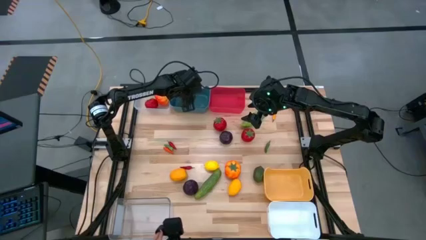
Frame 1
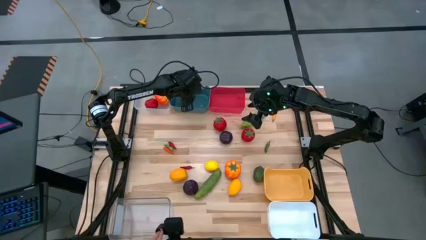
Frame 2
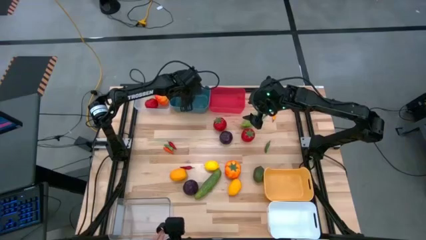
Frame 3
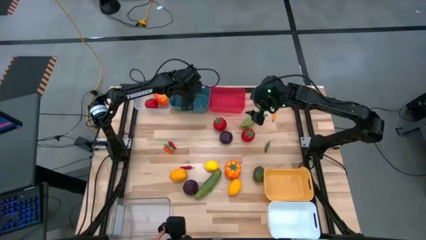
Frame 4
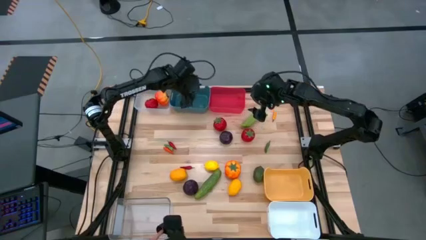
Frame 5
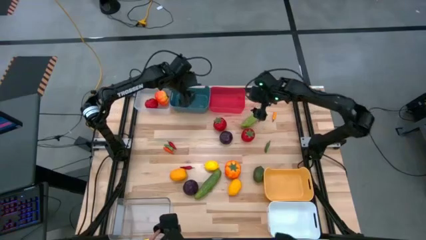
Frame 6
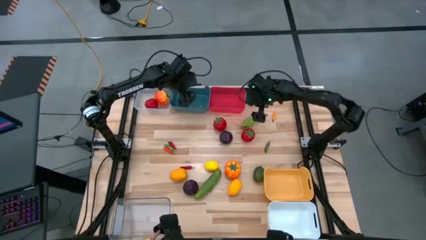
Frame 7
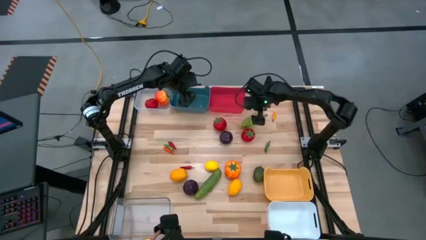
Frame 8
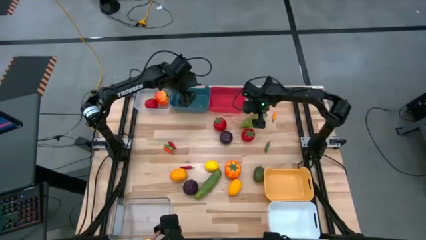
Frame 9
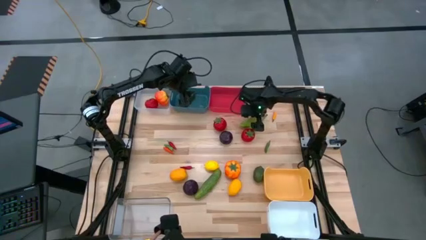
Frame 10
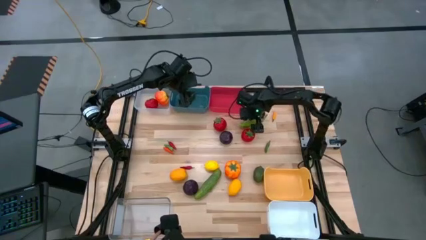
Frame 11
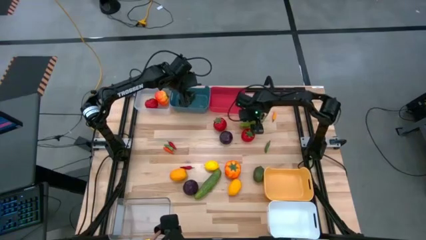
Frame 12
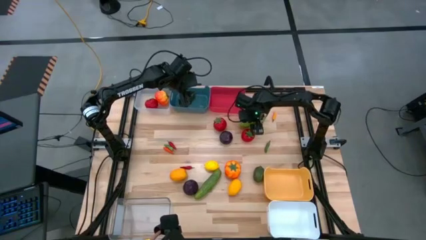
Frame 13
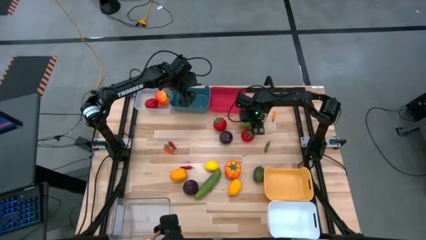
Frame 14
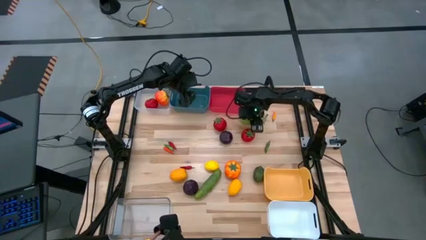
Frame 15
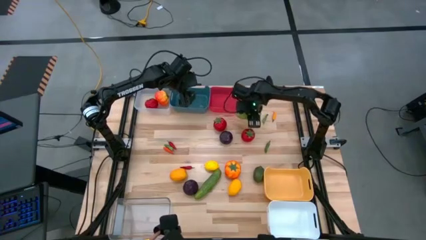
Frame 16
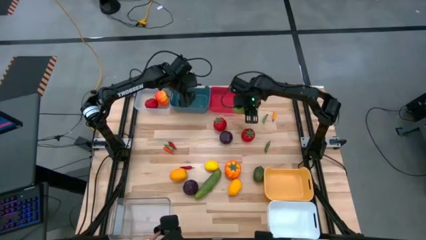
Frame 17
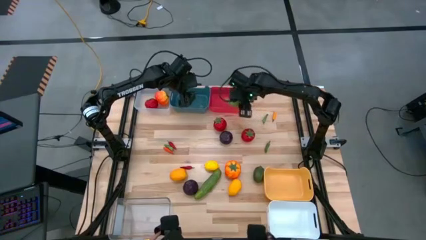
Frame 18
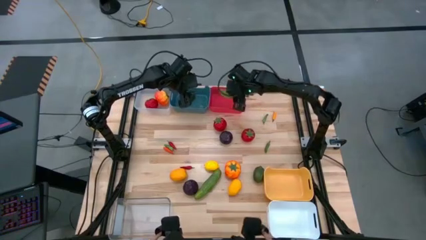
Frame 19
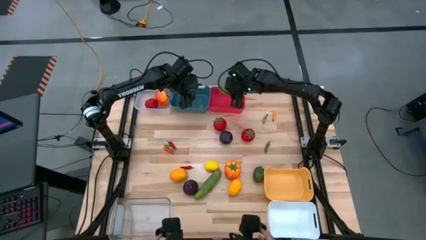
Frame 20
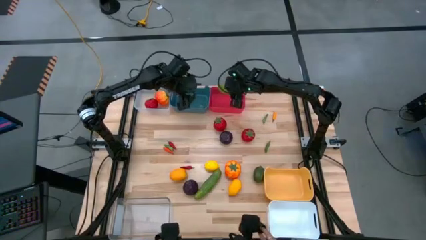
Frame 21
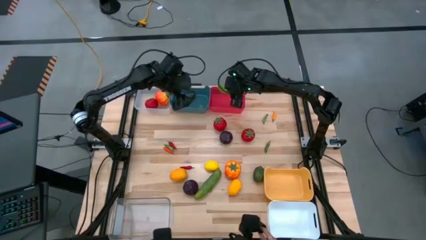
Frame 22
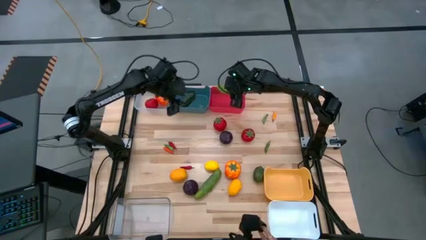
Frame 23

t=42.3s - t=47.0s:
Task: Sort produce into baskets
Put the cucumber into the red bin

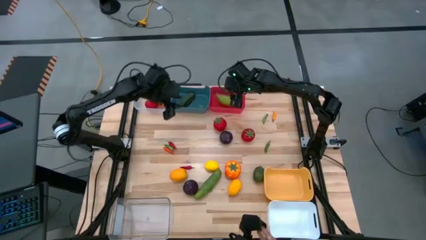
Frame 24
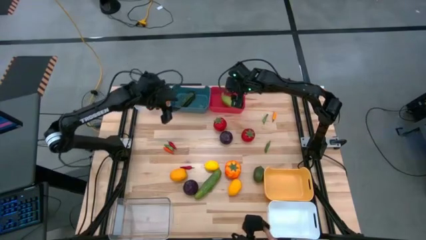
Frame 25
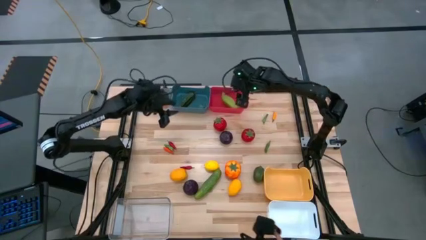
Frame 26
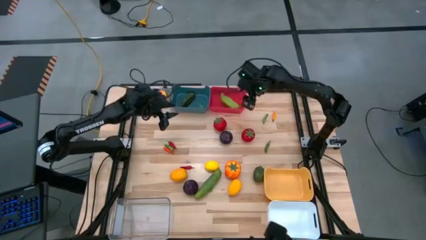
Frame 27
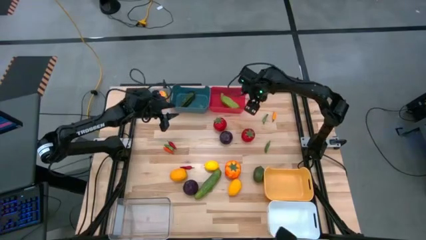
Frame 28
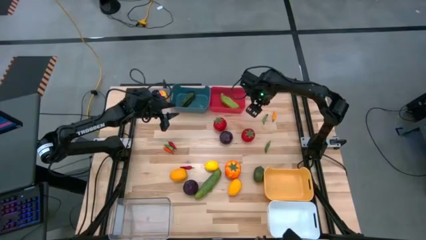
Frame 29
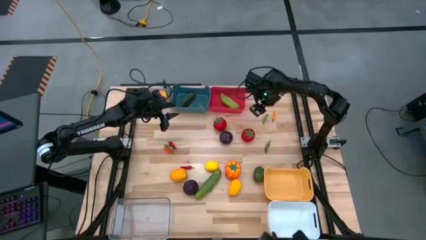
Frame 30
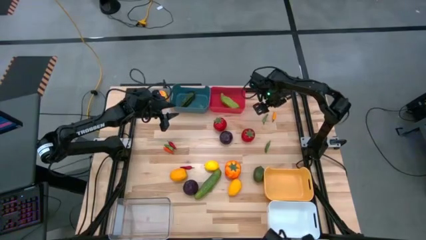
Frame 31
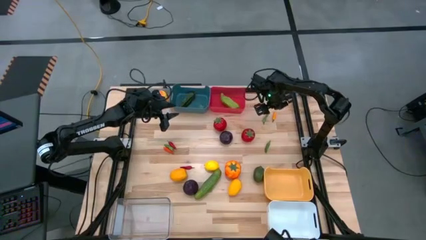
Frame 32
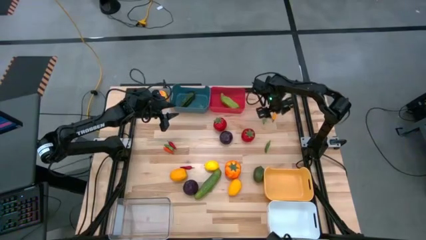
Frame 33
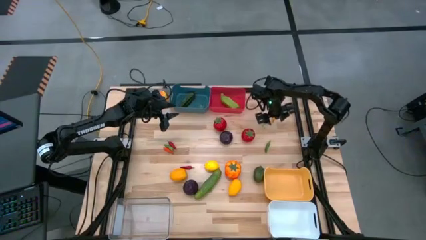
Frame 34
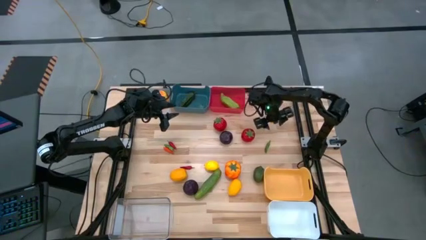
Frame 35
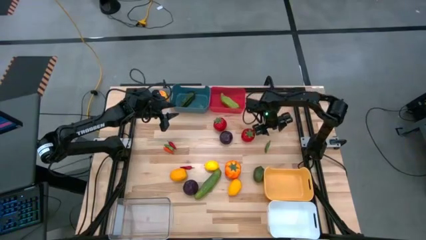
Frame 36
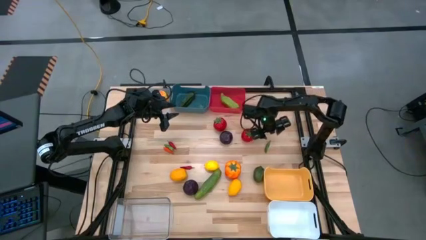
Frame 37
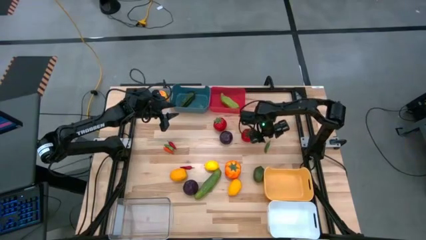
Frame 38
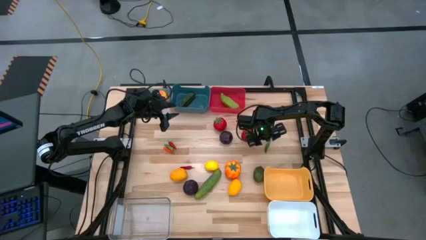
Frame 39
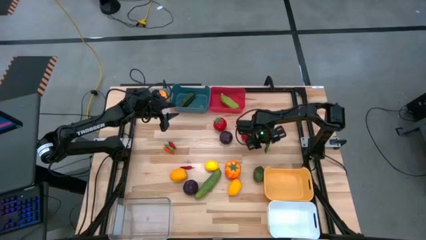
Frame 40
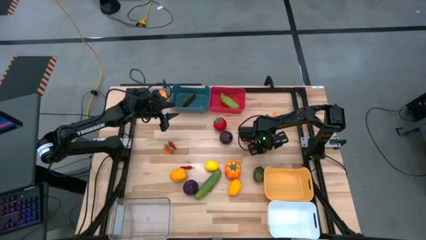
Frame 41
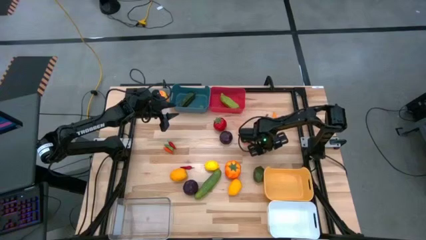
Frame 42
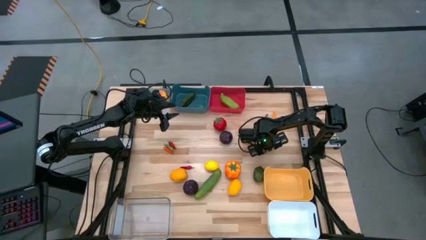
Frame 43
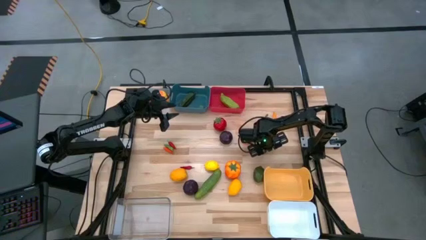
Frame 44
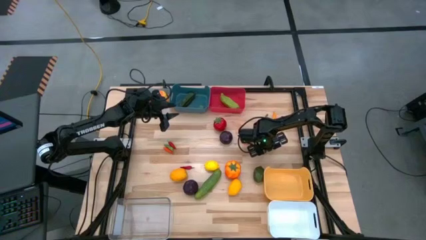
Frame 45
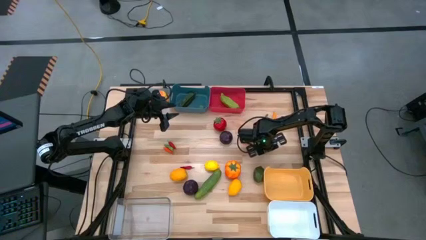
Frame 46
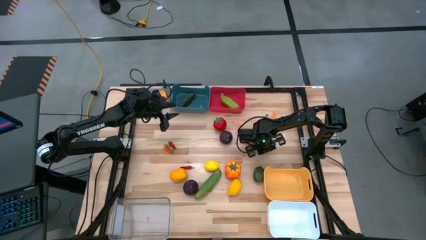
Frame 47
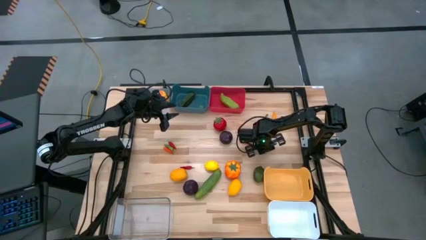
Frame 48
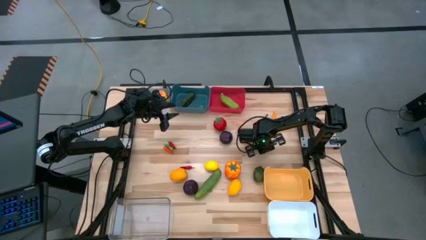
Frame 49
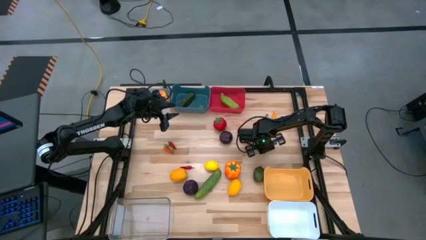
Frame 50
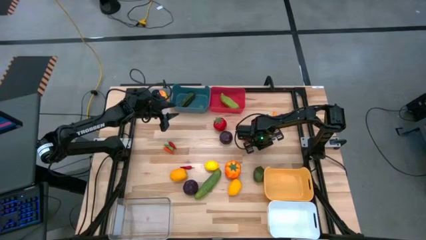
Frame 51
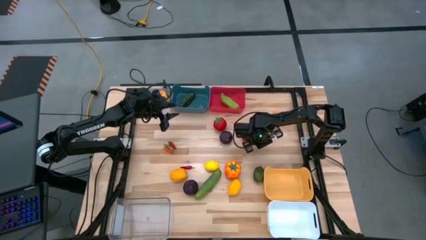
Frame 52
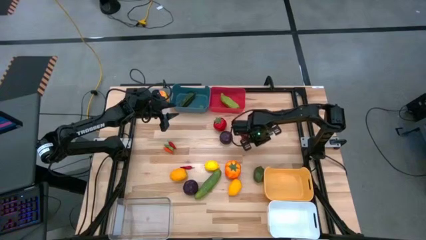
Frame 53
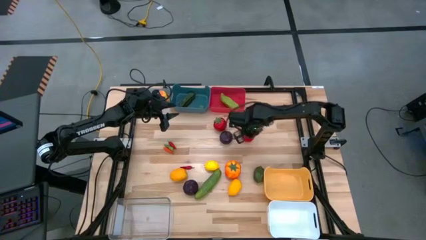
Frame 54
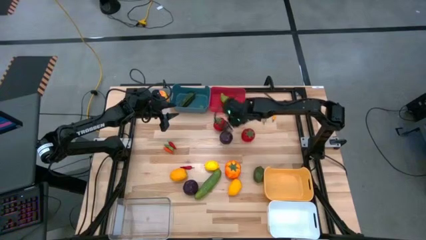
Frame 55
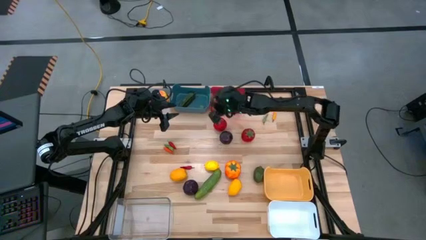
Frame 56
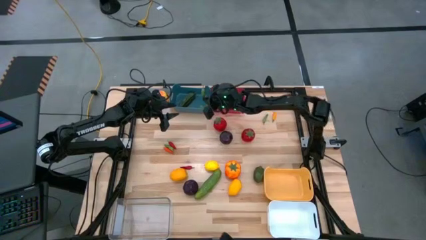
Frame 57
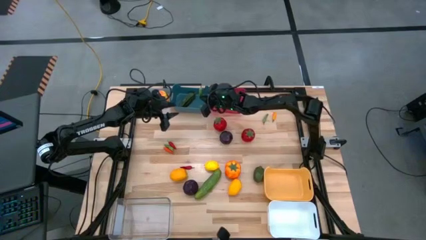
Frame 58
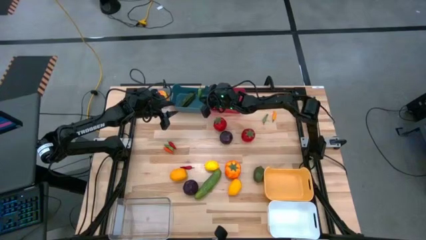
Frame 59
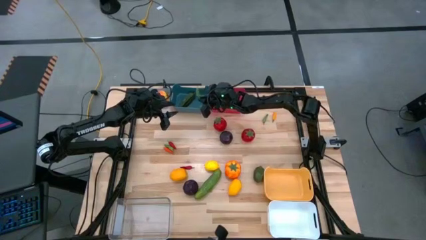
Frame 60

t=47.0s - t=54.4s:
Put the green chili pepper into the blue bin

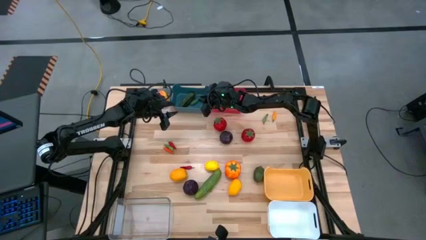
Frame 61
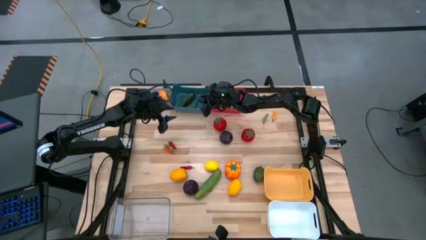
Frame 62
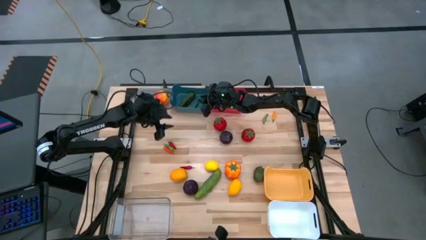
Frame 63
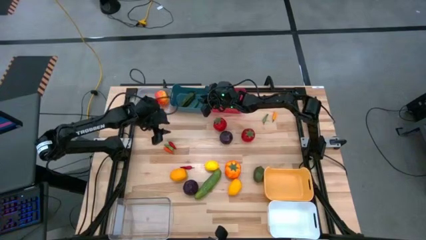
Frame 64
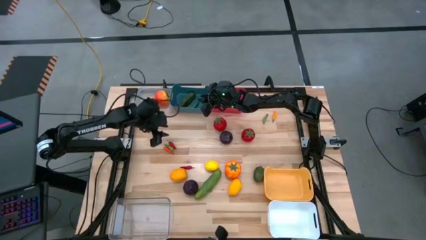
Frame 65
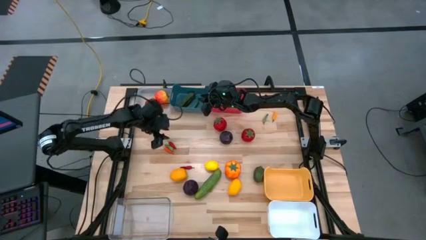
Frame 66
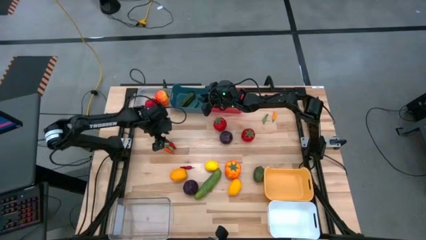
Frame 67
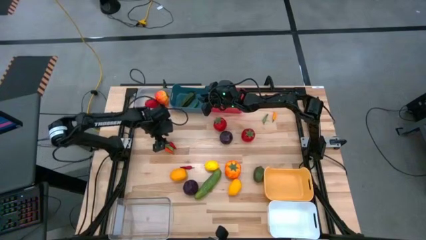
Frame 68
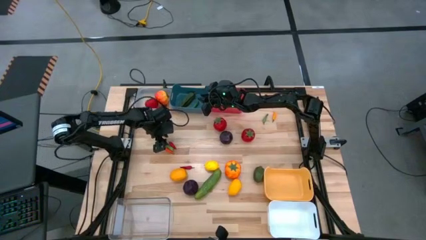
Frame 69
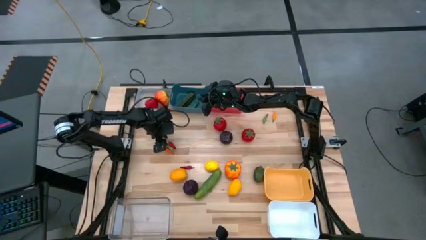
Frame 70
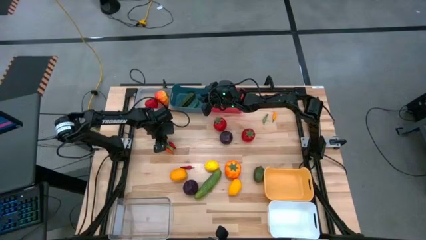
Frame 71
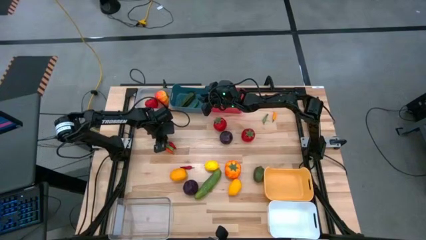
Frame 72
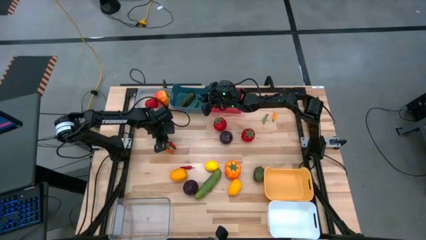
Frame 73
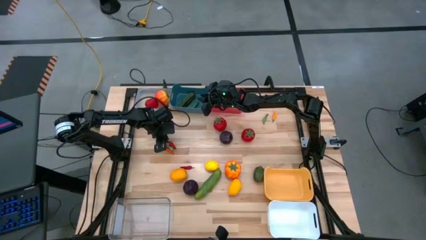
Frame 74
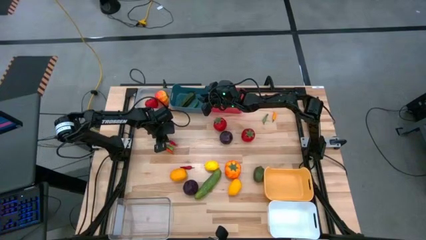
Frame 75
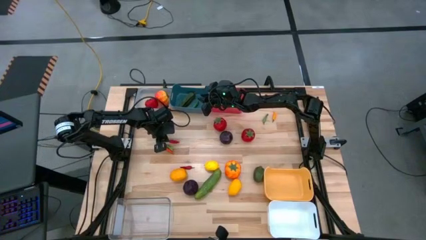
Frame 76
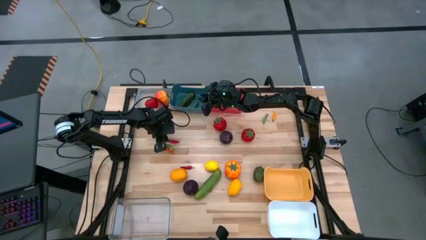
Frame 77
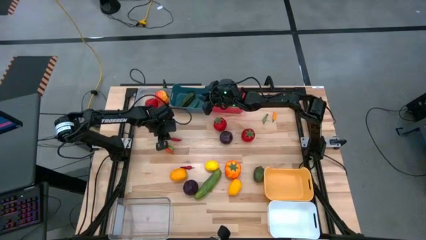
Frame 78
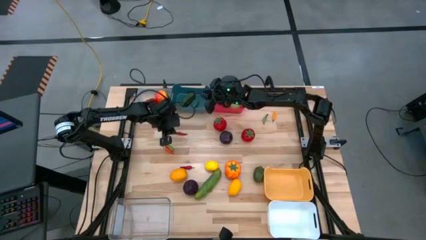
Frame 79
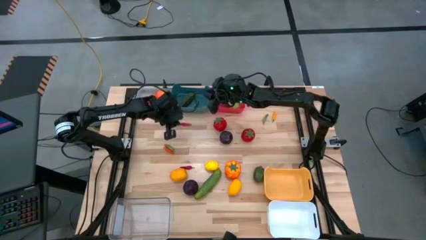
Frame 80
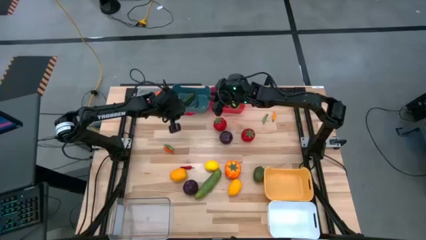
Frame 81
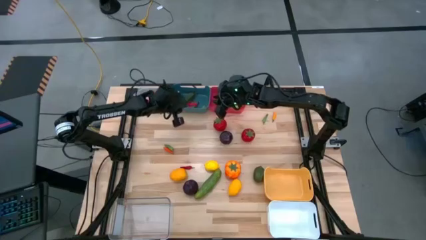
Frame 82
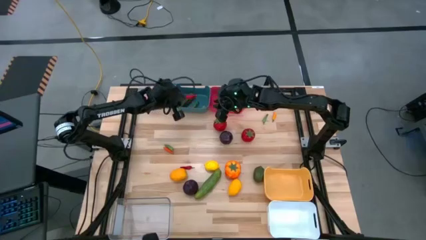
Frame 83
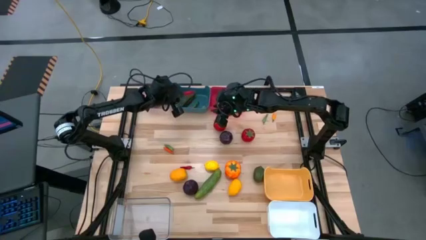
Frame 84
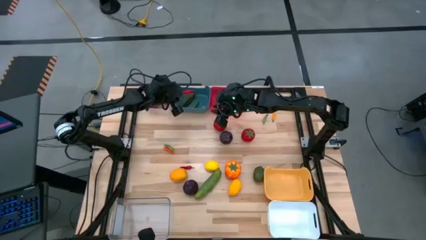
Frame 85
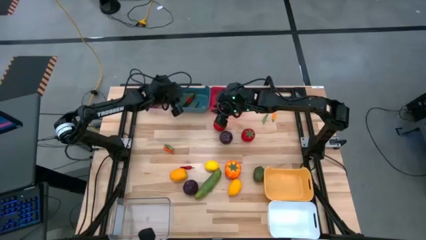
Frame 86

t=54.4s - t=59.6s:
Put the red chili pepper into the blue bin
